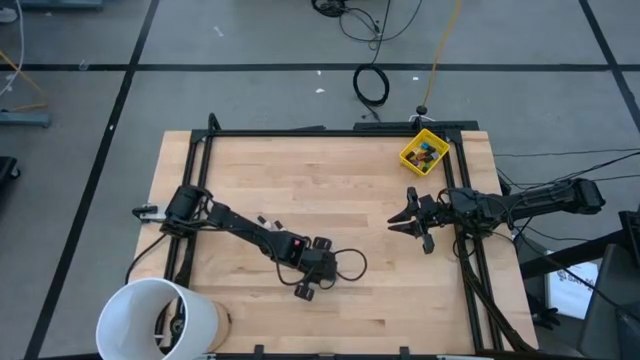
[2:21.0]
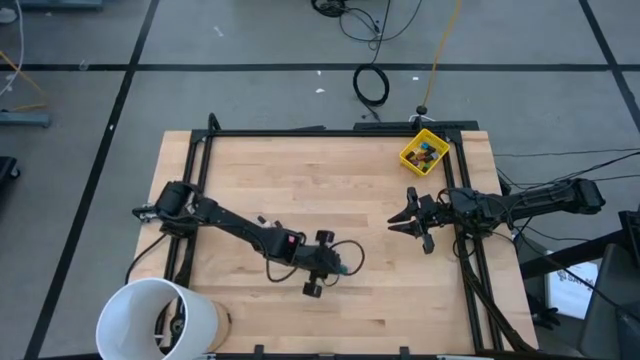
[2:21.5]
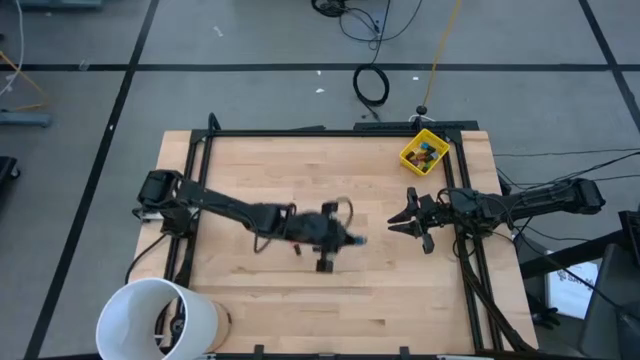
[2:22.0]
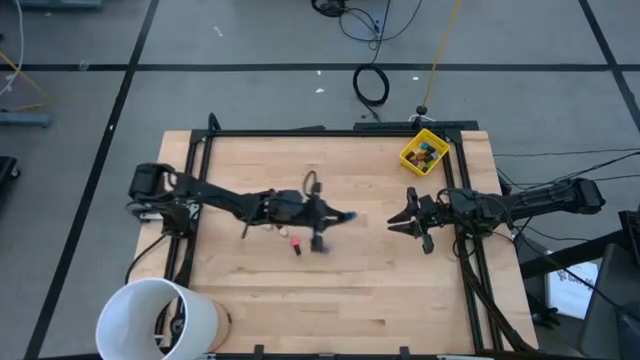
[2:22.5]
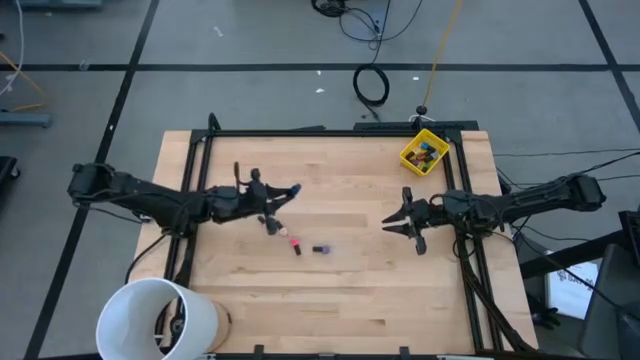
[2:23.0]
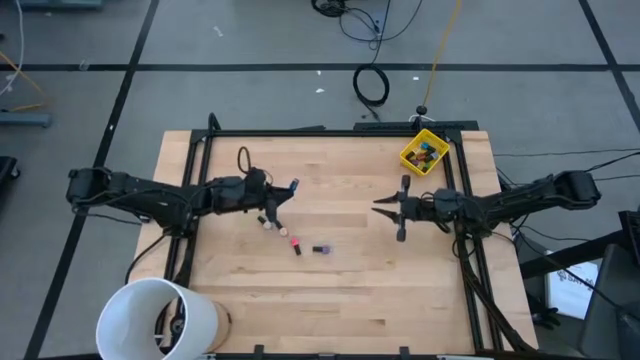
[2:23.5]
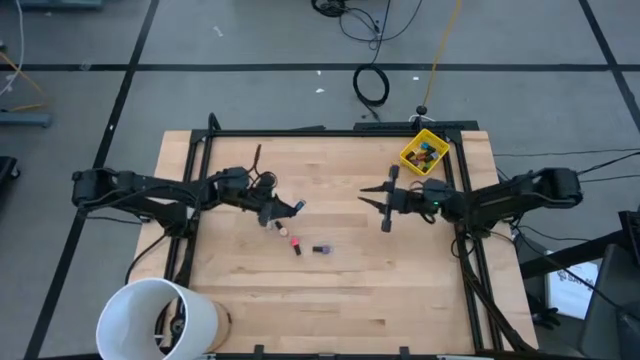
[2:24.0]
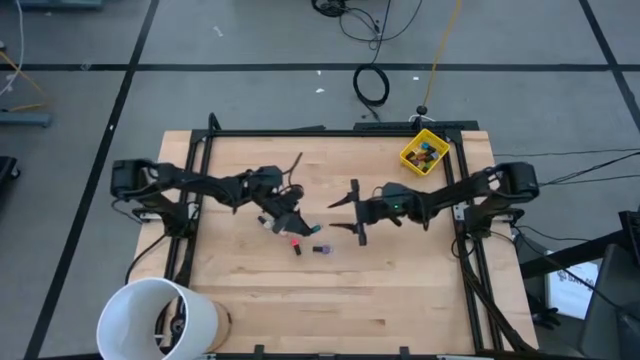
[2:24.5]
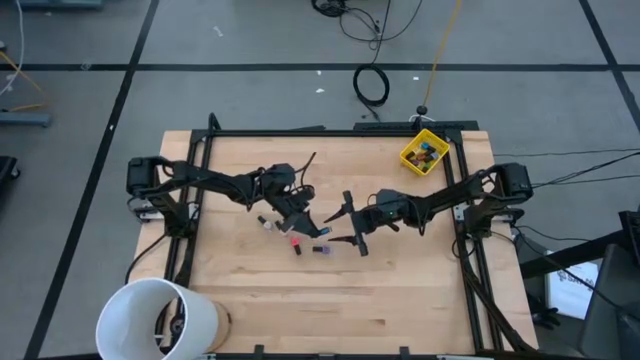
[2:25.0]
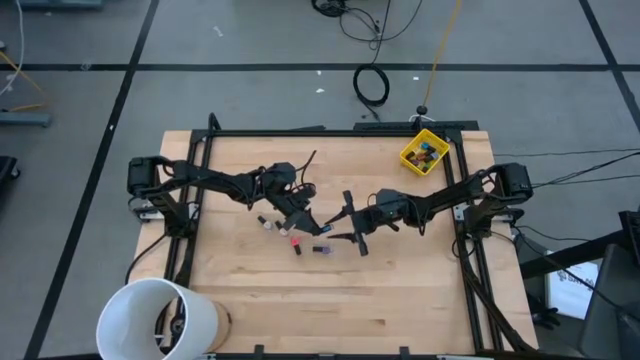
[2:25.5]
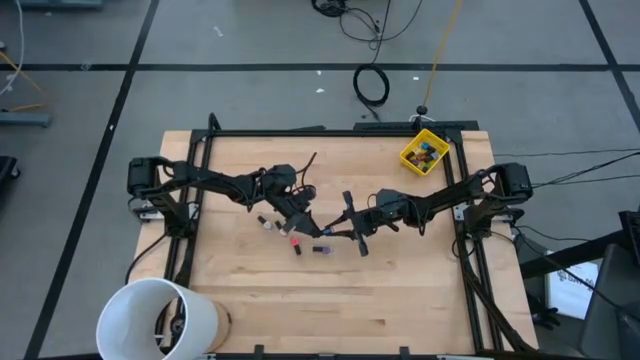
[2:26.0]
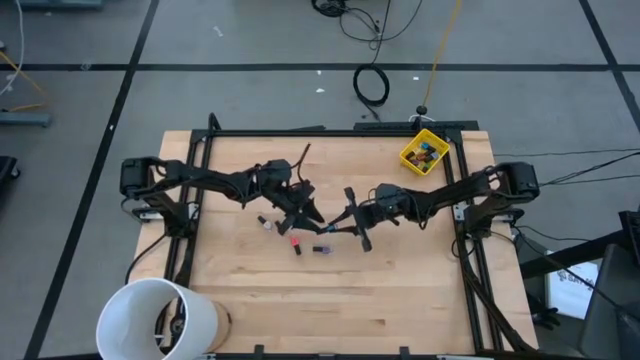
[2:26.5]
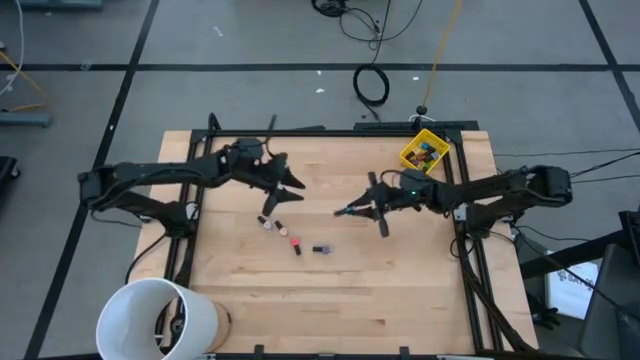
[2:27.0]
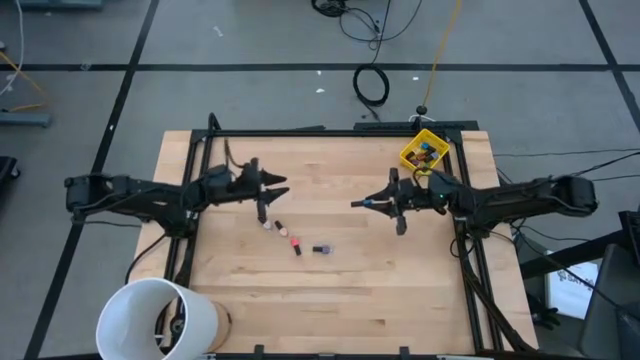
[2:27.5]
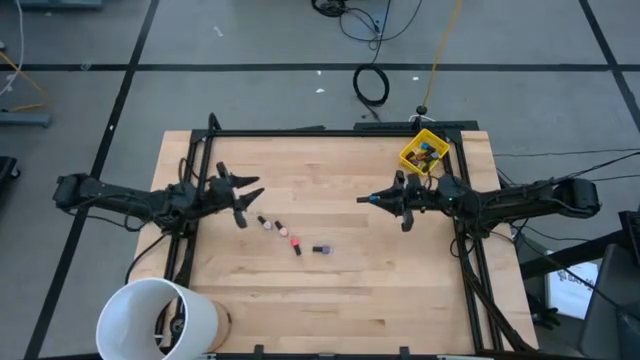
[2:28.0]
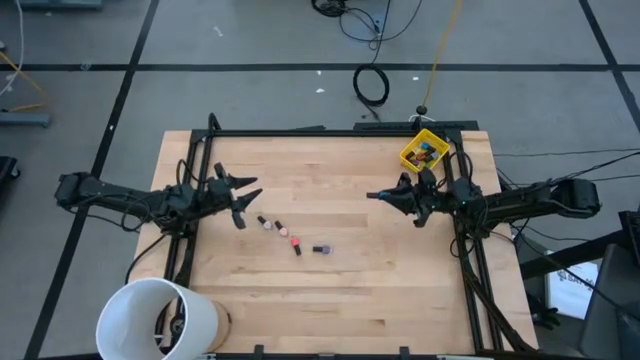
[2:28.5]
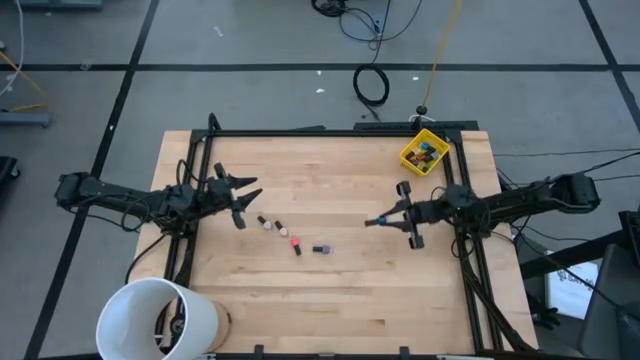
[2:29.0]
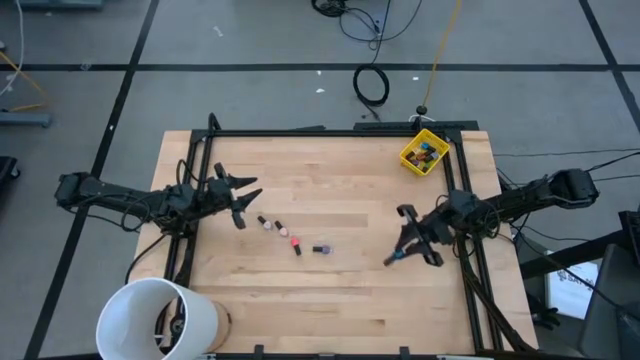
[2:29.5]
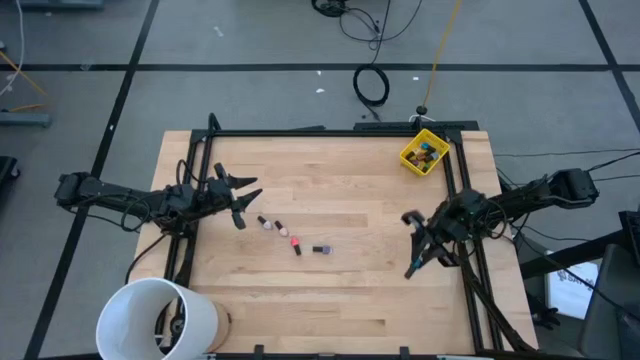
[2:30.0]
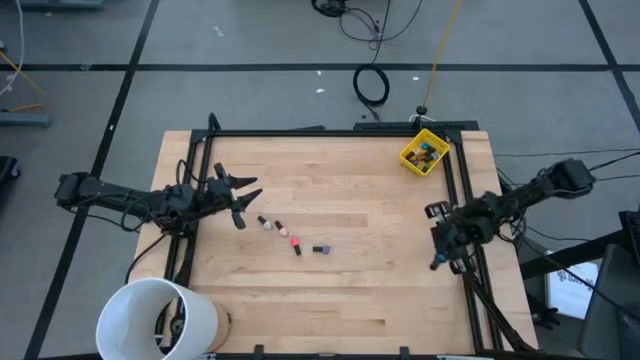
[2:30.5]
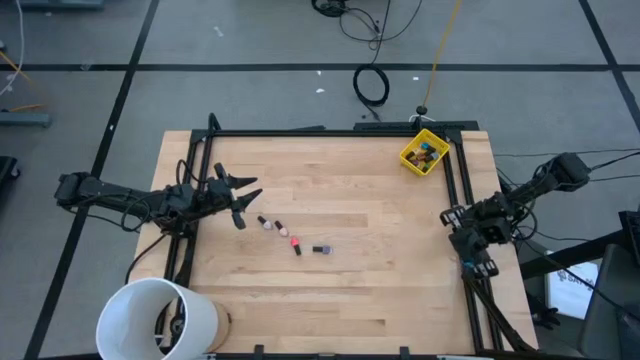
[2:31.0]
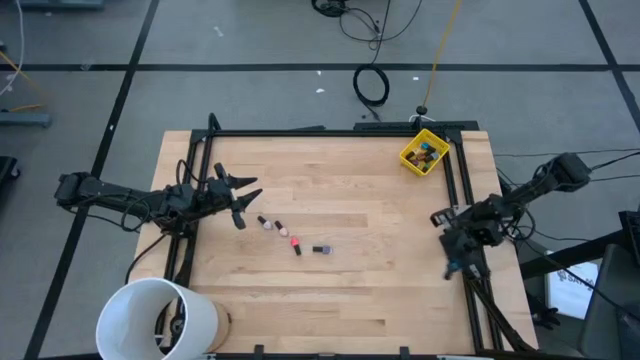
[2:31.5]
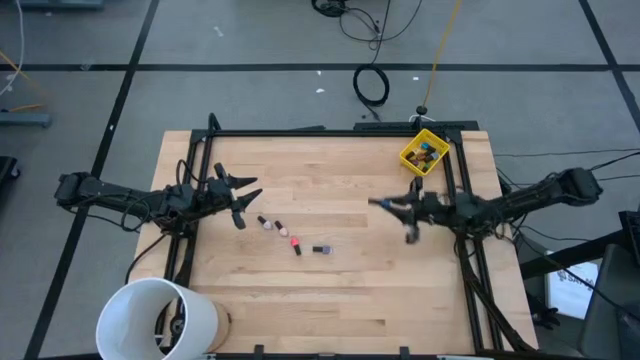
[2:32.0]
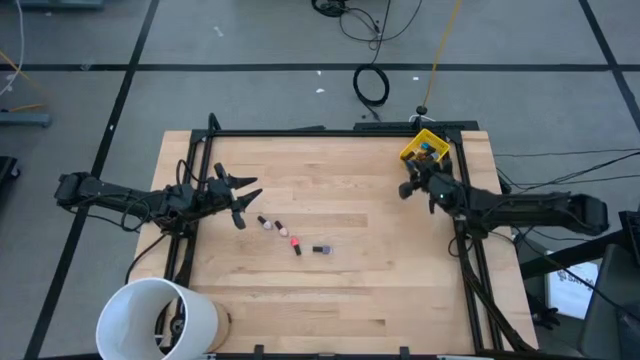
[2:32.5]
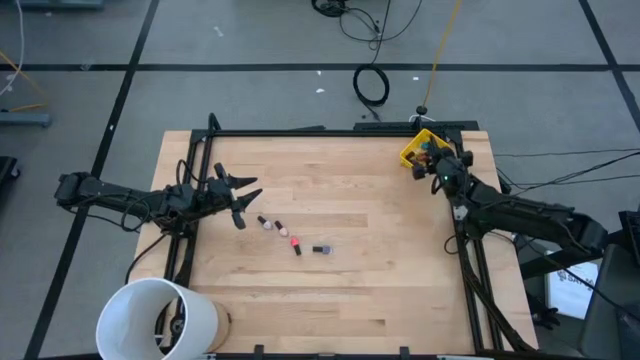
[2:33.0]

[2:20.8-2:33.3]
Task: Pick & Place Nail Polish
Put the dark blue nail polish bottle into the yellow bin

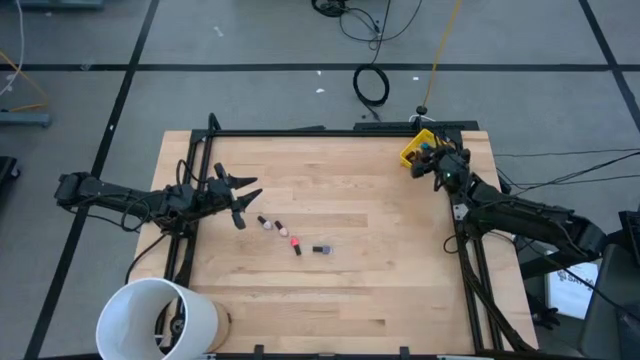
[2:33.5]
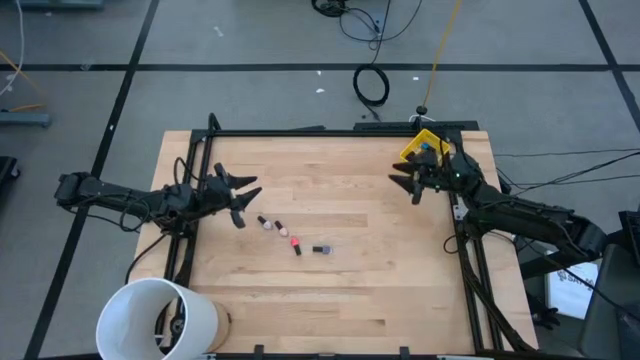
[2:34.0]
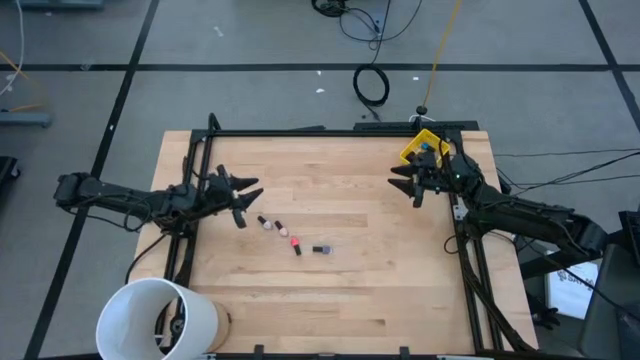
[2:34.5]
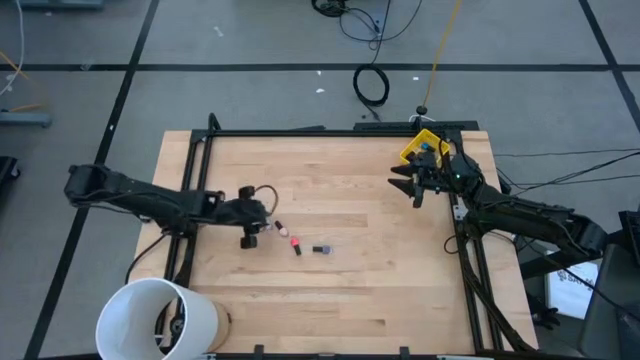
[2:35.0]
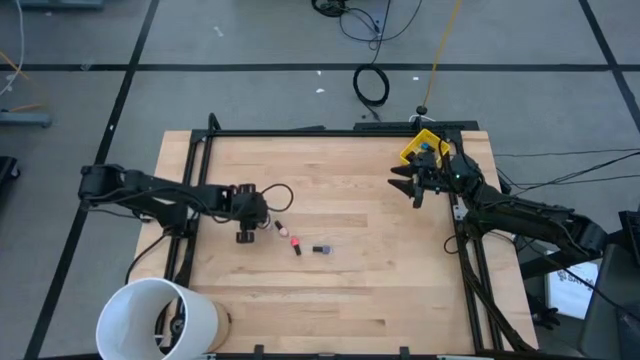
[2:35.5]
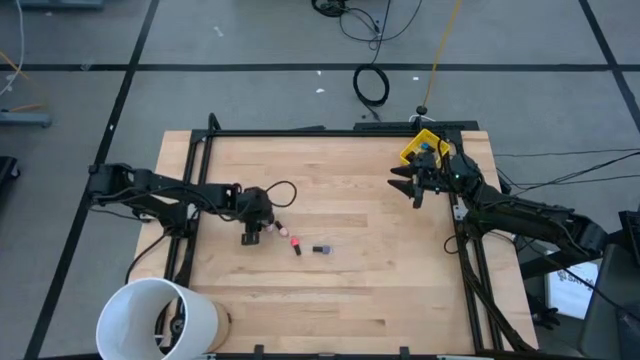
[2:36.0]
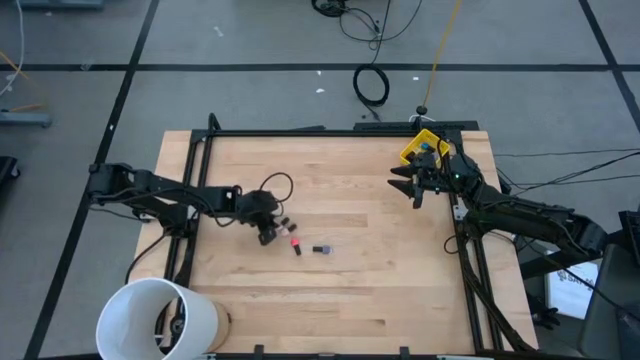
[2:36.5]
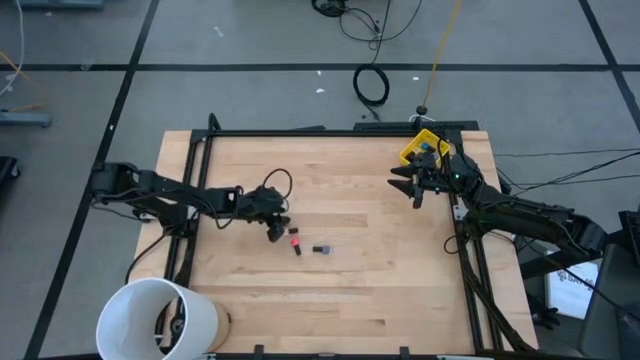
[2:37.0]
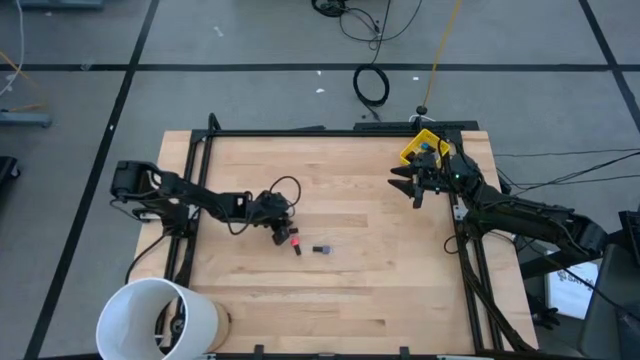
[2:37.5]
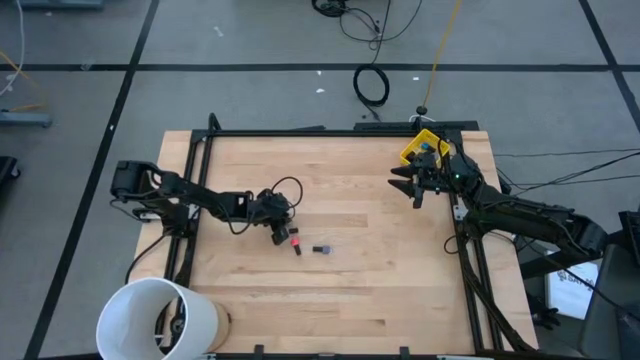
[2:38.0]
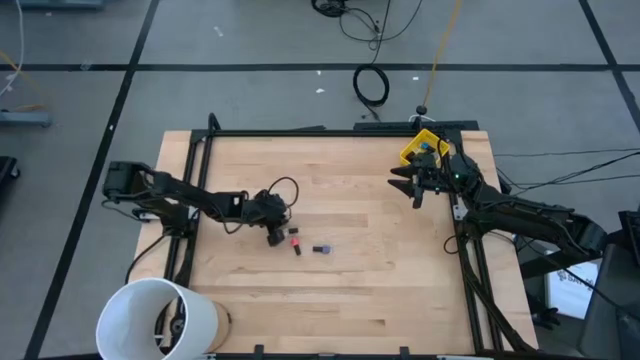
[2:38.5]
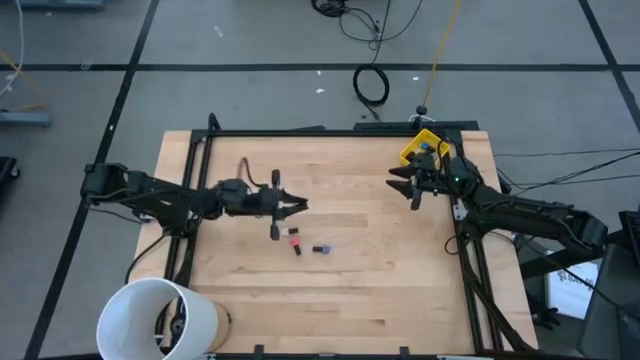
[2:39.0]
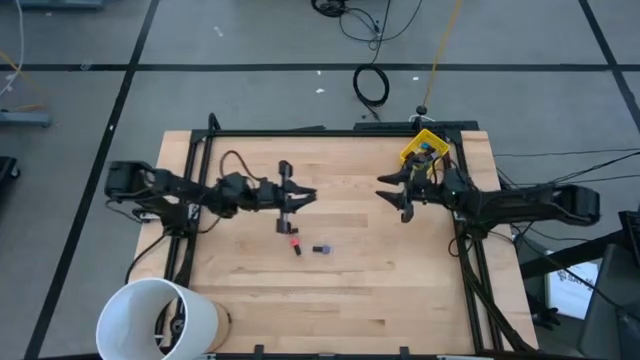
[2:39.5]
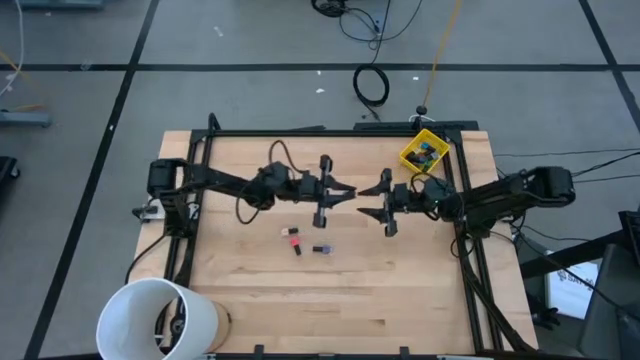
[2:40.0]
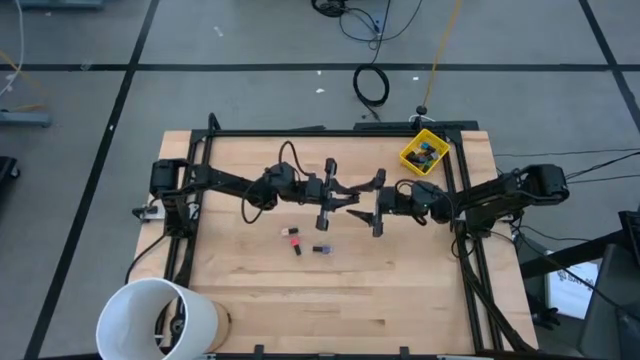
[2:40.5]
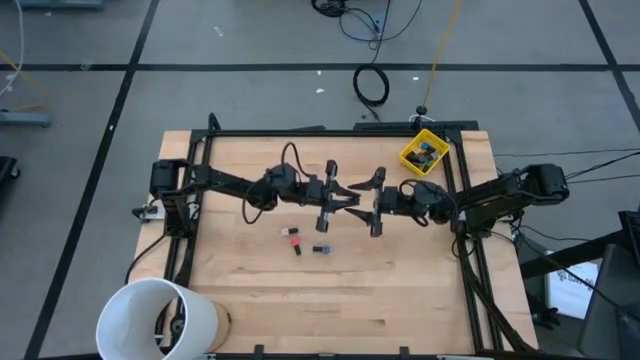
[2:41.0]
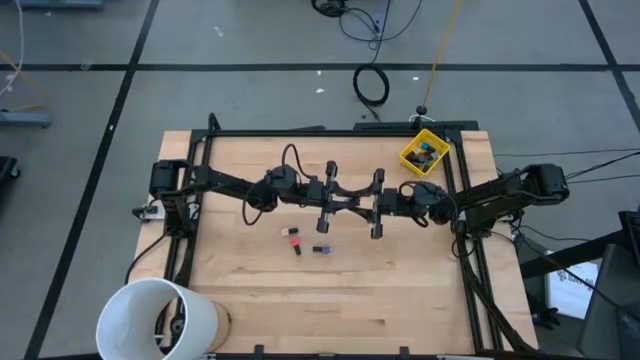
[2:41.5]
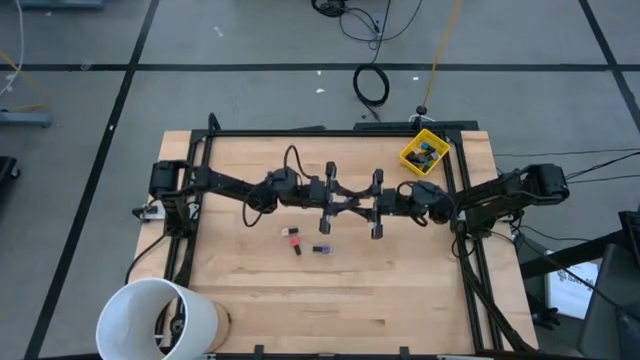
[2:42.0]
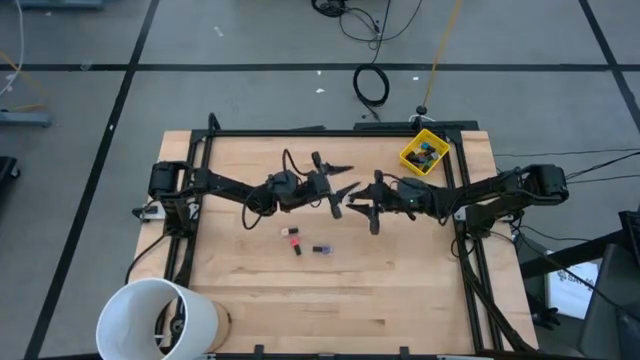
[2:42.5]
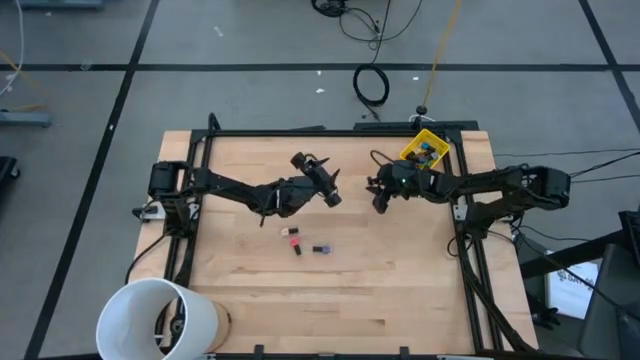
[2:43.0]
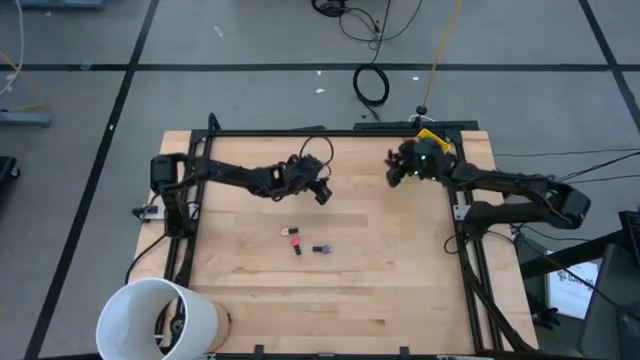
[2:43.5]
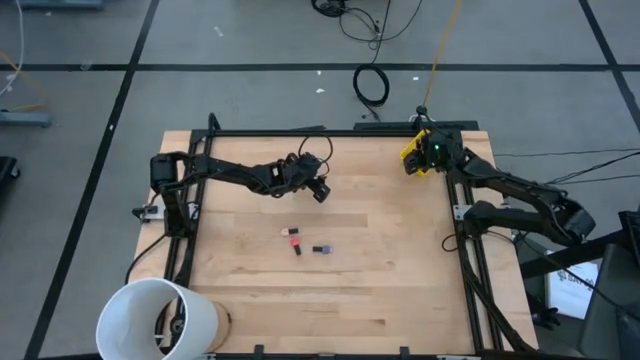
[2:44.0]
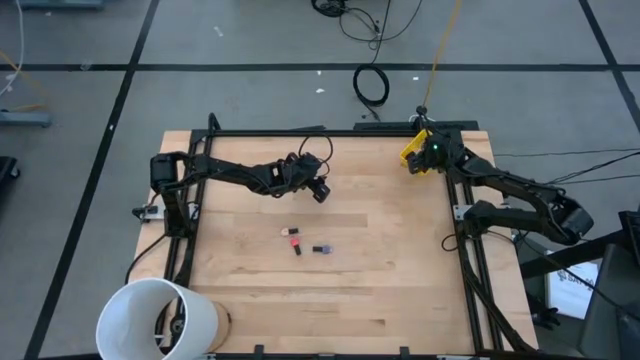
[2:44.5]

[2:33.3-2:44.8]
Put the white nail polish bottle into the yellow bin
